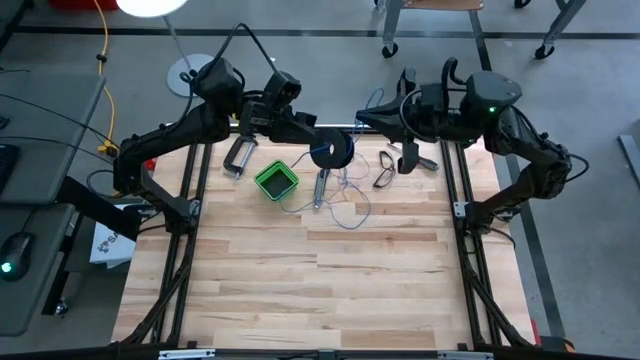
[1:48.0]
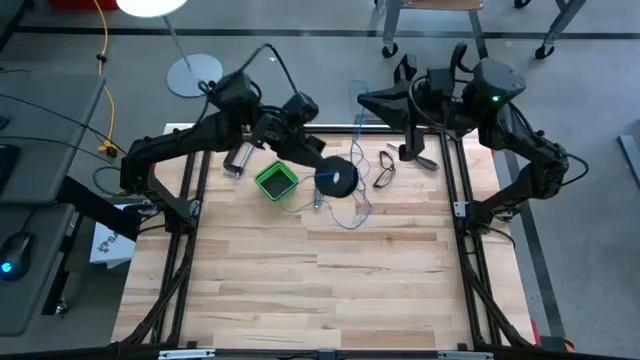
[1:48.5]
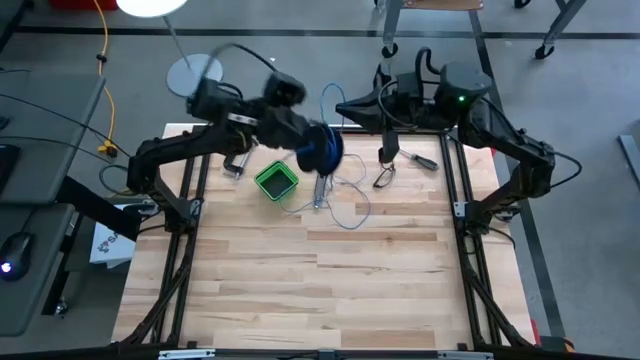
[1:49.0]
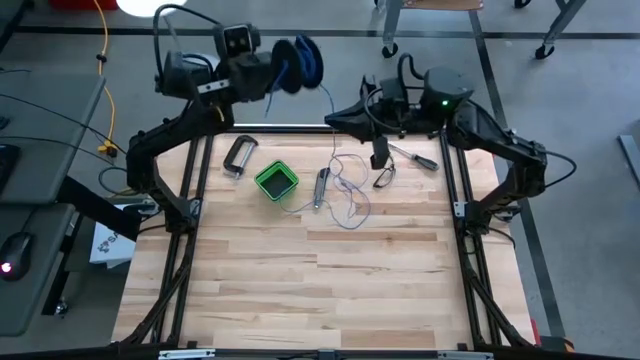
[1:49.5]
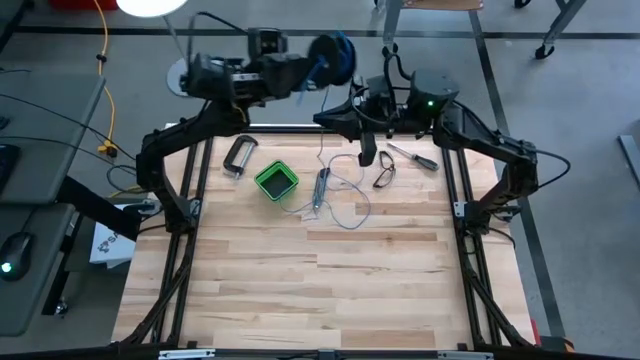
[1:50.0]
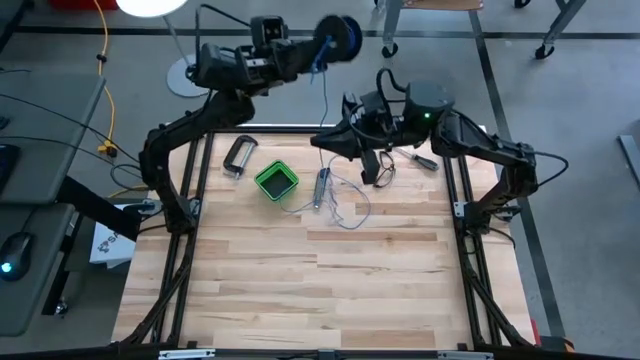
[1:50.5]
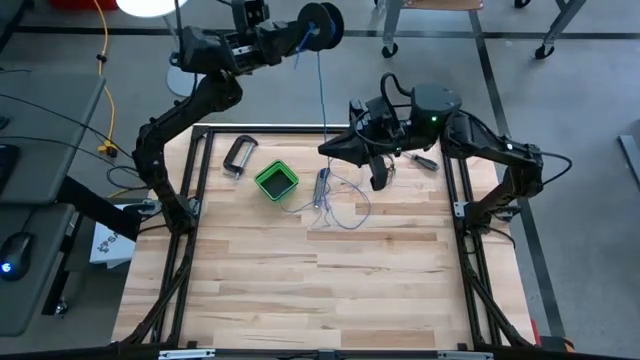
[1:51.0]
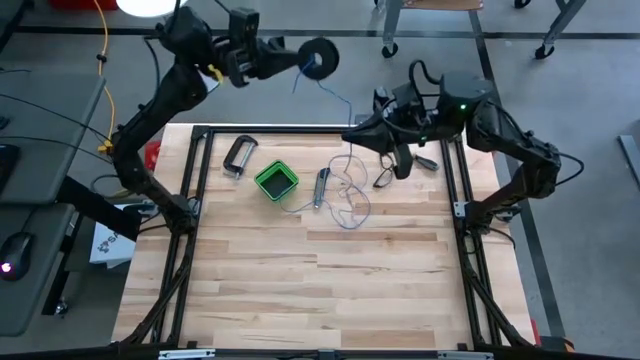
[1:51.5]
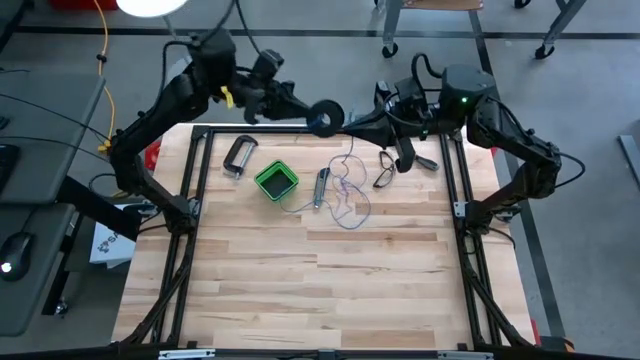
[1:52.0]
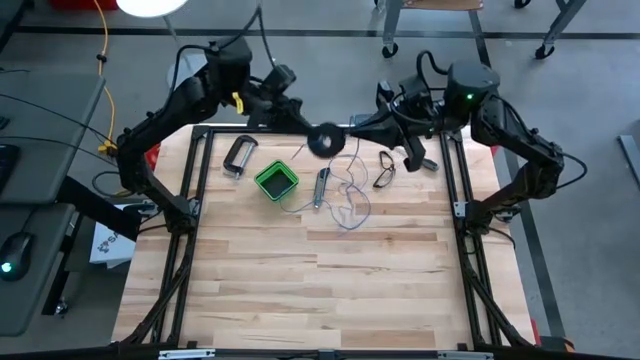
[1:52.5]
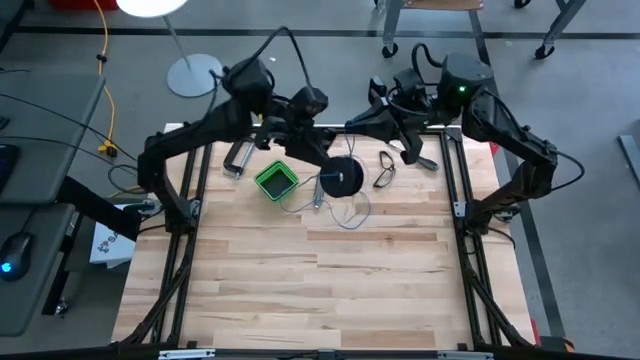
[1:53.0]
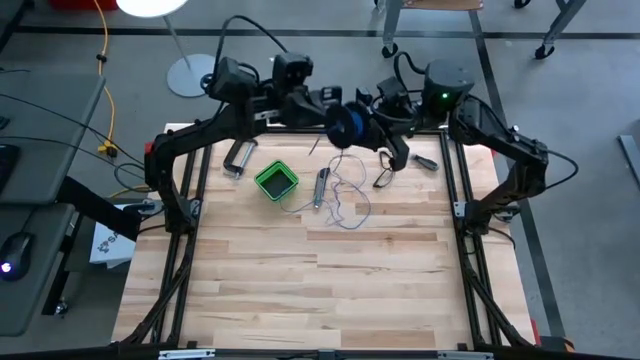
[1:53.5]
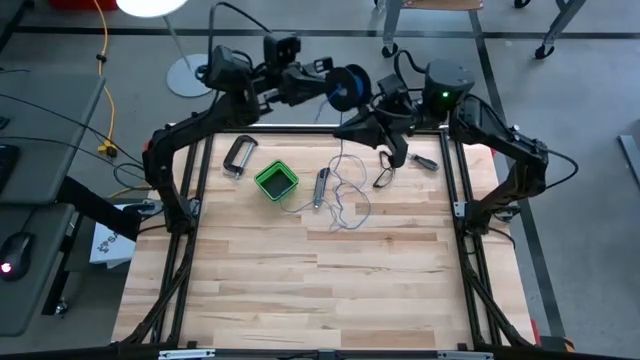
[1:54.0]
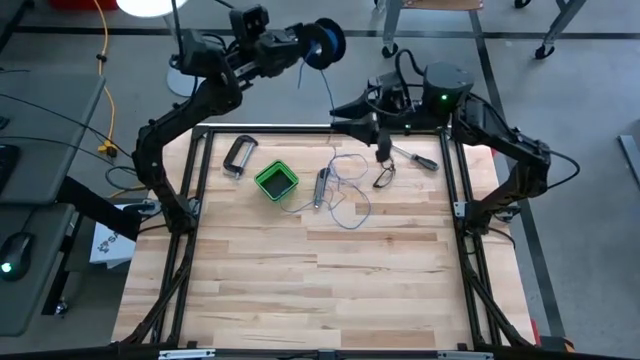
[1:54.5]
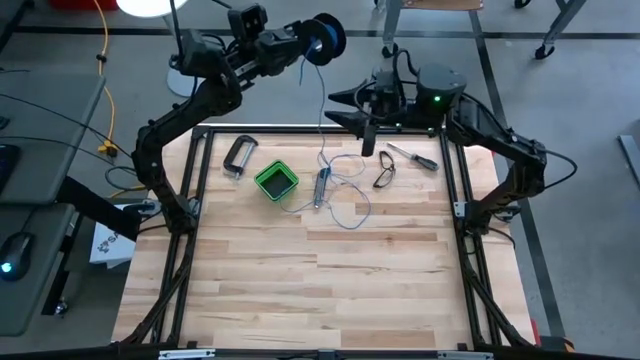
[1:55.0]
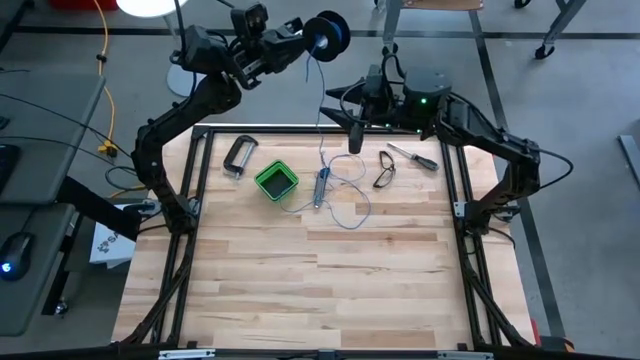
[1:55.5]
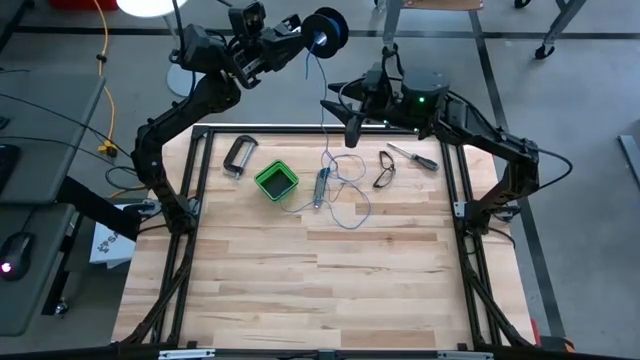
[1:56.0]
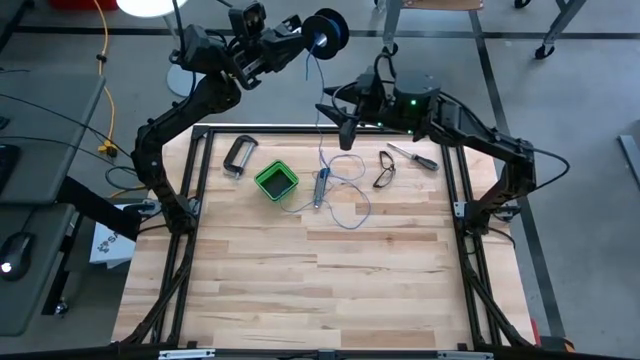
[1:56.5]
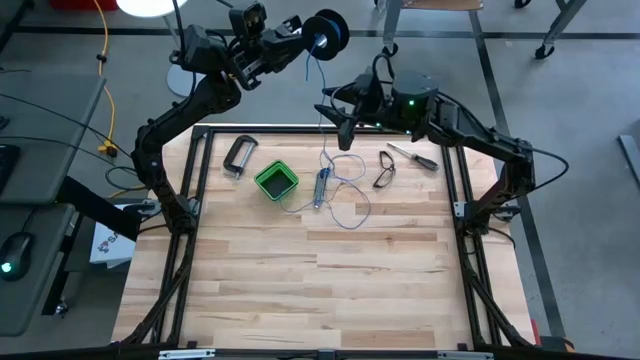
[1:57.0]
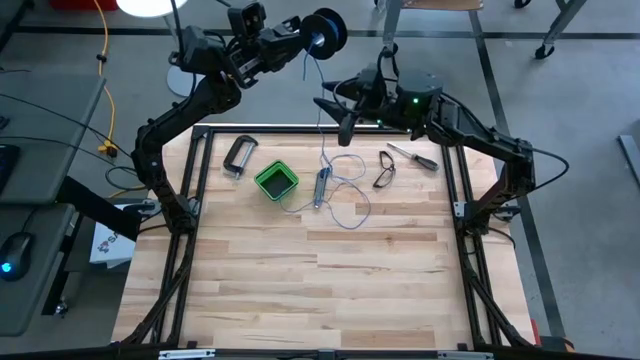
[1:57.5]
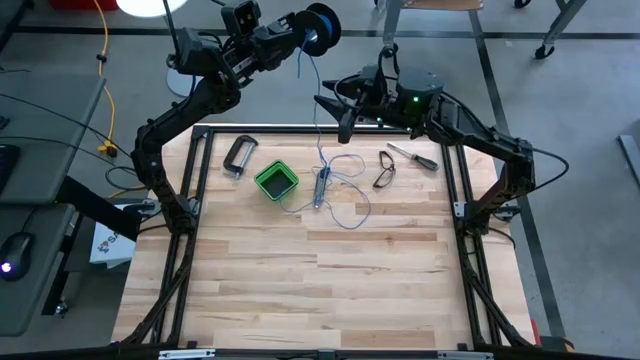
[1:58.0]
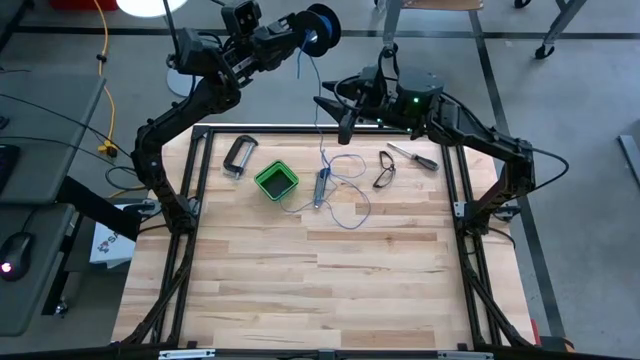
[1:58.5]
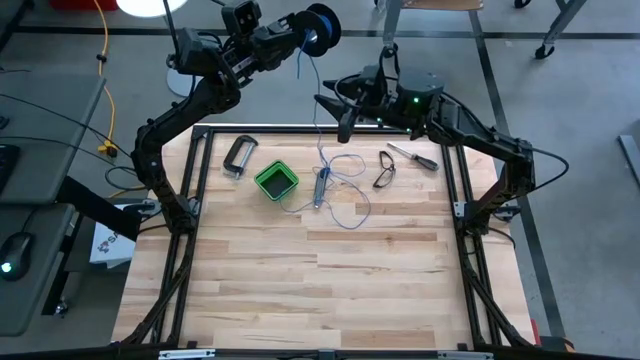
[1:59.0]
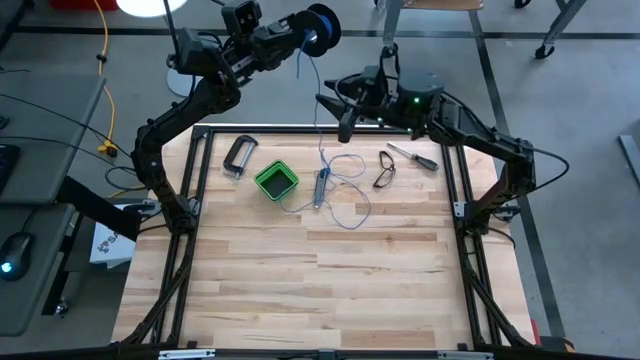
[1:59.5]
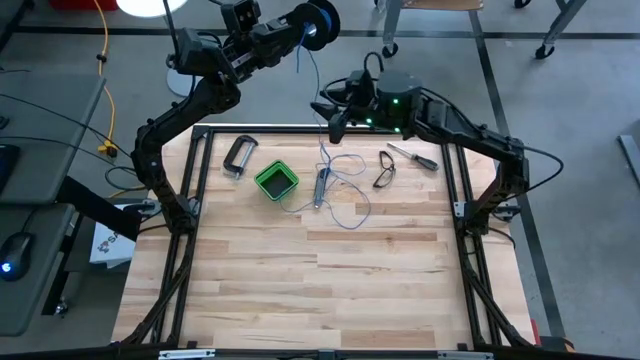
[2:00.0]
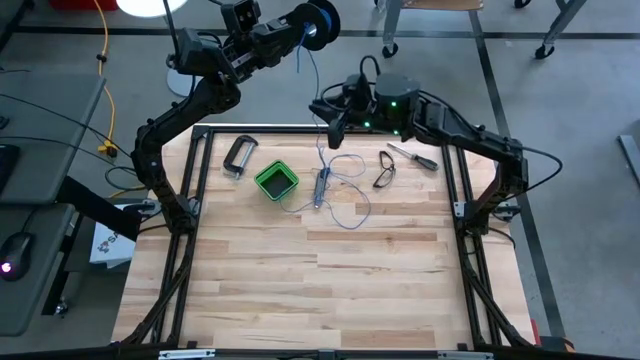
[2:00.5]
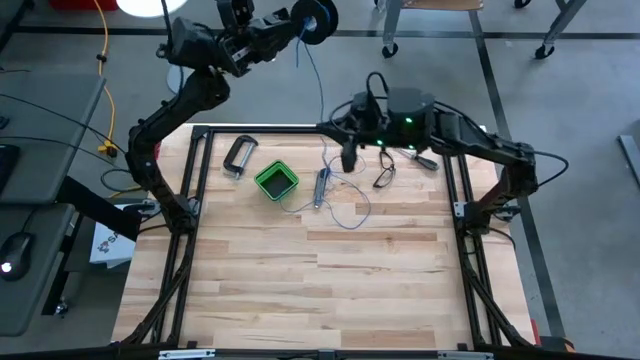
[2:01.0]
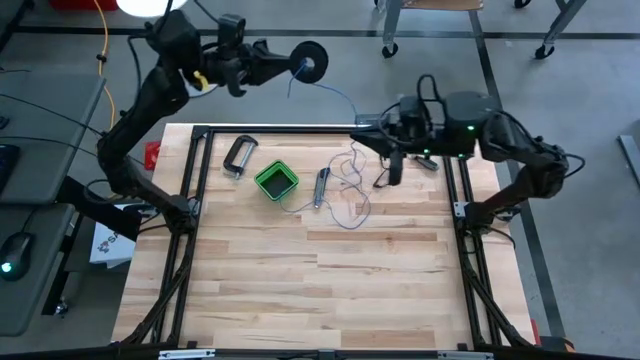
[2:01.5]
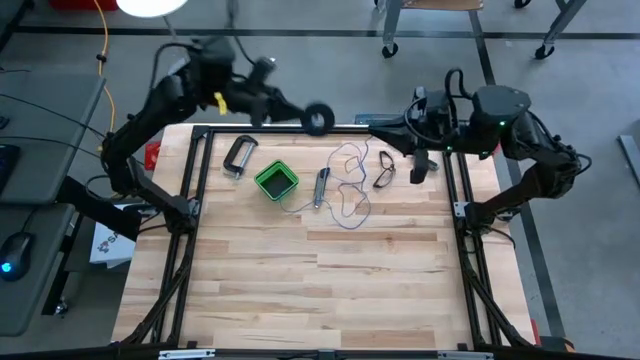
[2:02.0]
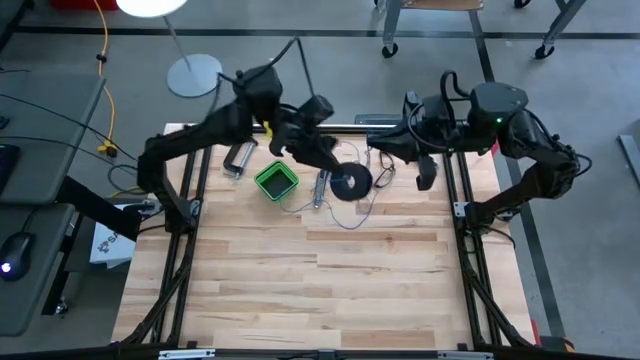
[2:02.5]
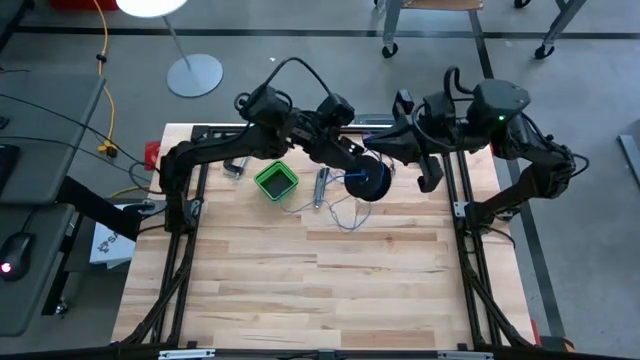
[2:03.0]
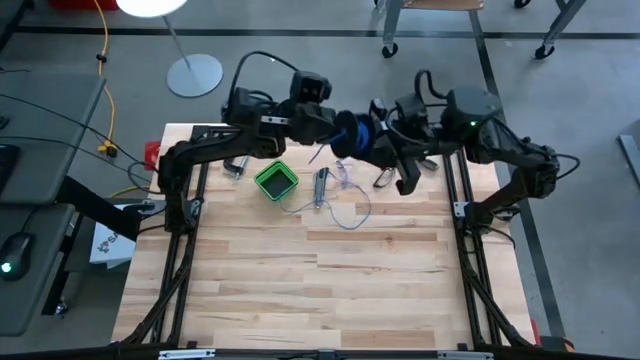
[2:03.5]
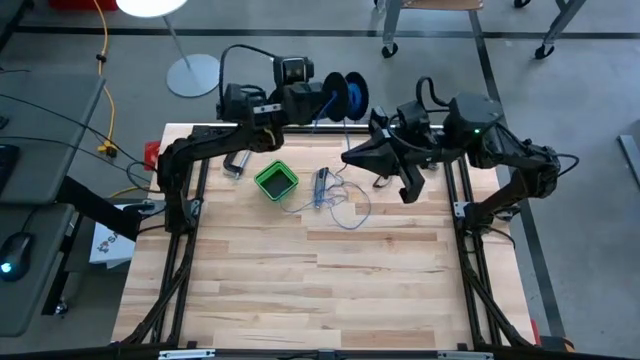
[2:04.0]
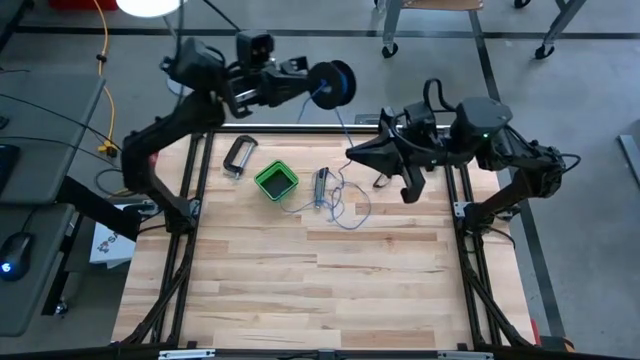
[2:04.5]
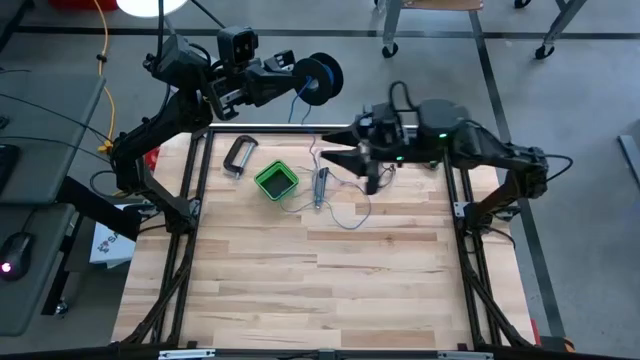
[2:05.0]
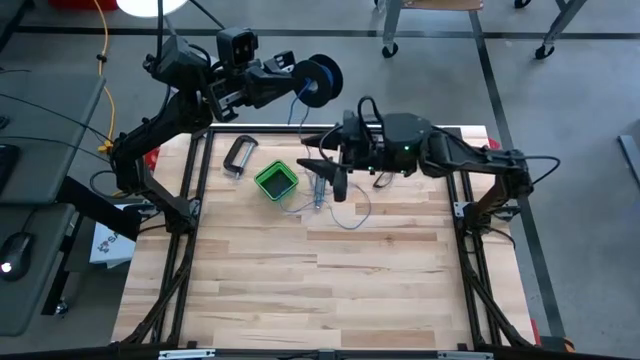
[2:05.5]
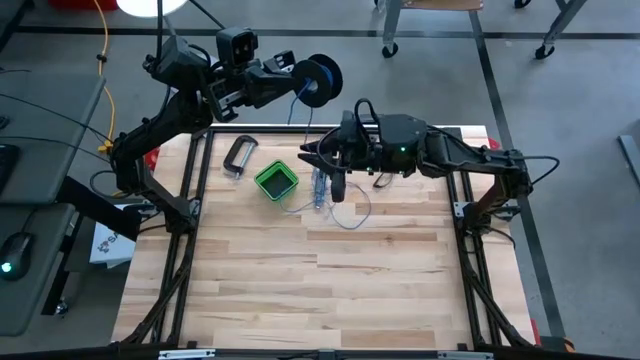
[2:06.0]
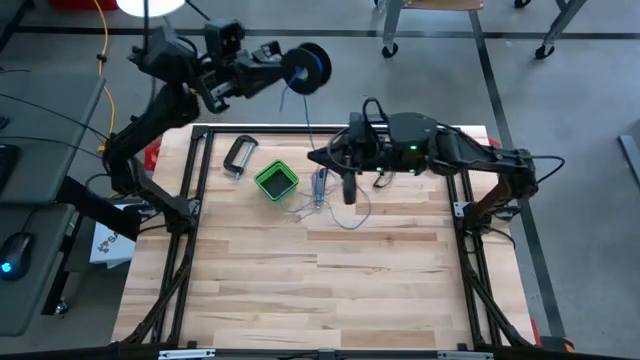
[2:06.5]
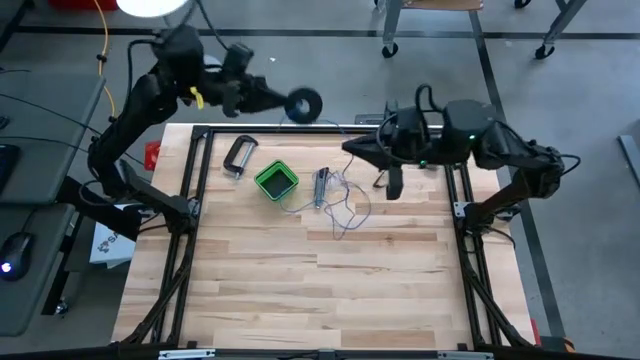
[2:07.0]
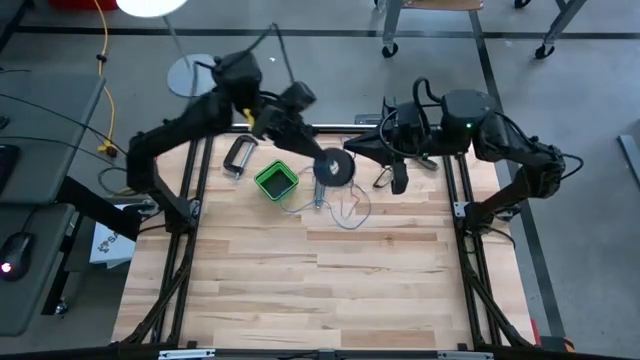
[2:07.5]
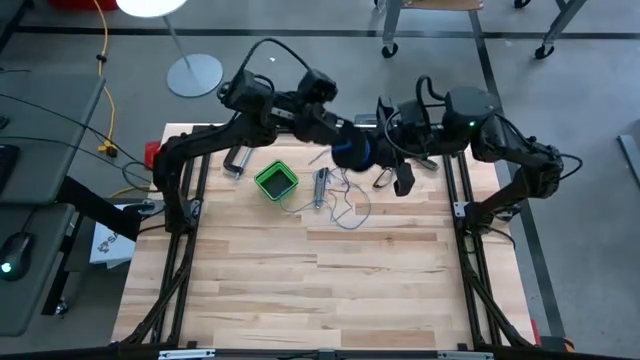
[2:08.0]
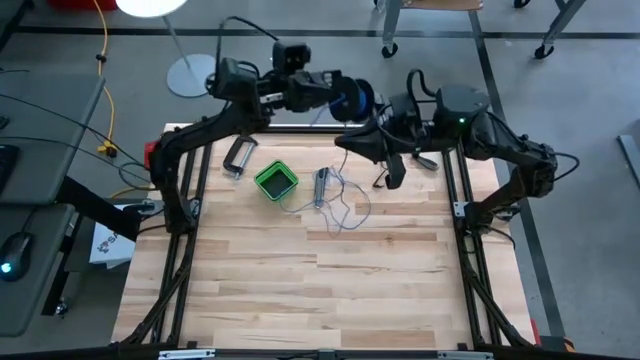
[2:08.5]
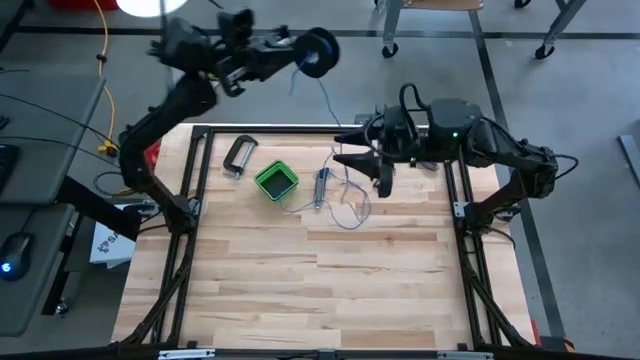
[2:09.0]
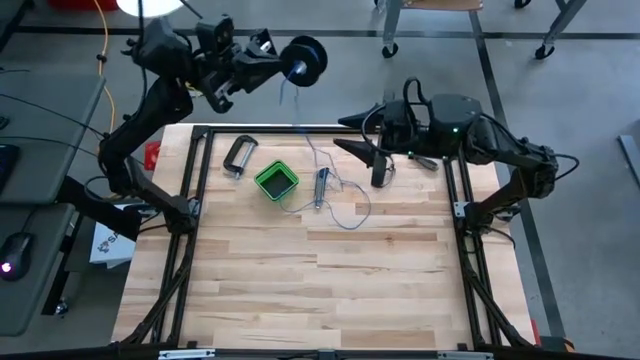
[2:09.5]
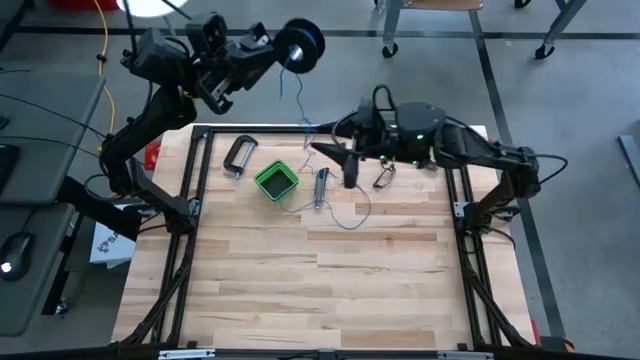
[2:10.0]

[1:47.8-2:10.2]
Task: Coil cords
Coil the blue wire onto the spool
